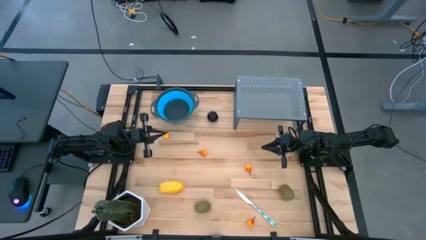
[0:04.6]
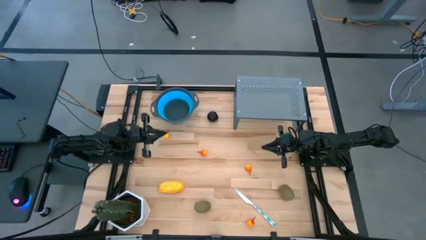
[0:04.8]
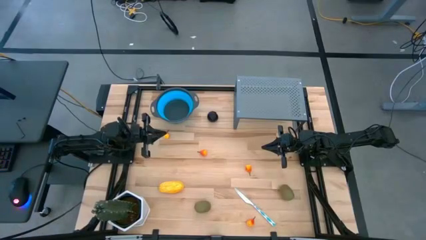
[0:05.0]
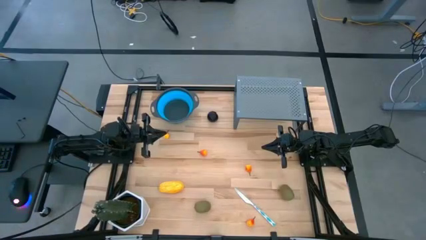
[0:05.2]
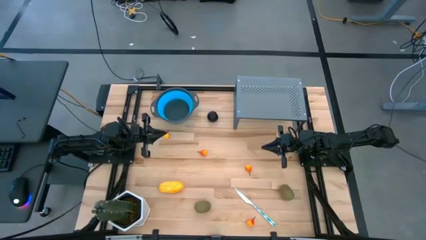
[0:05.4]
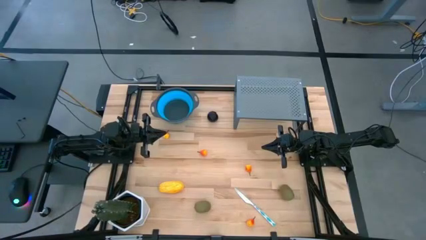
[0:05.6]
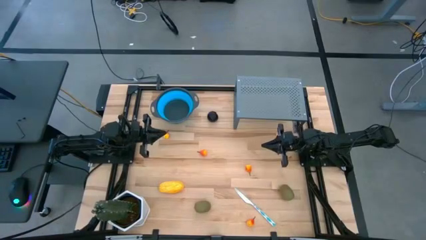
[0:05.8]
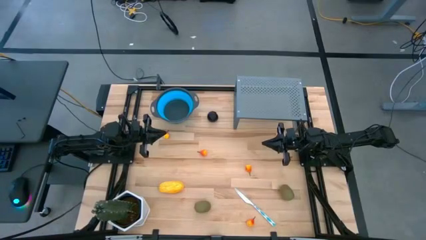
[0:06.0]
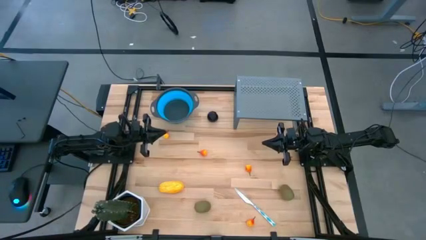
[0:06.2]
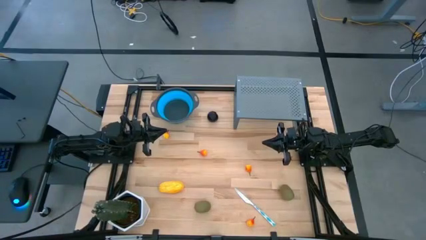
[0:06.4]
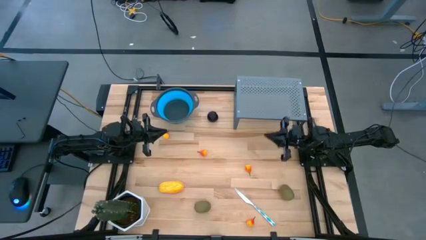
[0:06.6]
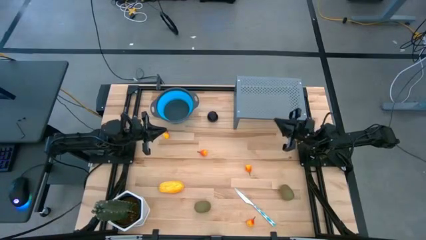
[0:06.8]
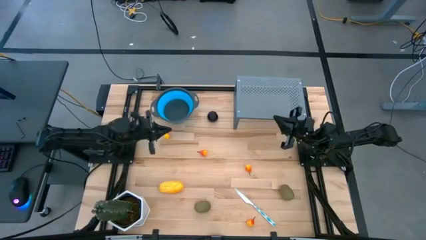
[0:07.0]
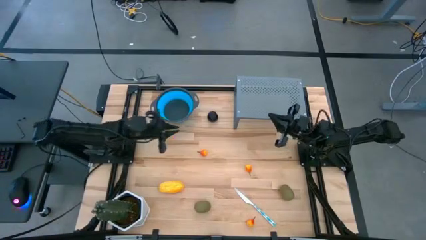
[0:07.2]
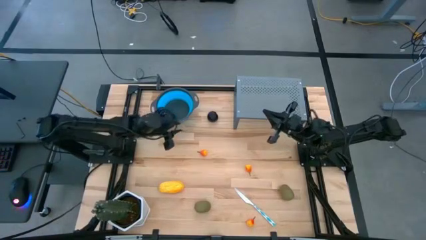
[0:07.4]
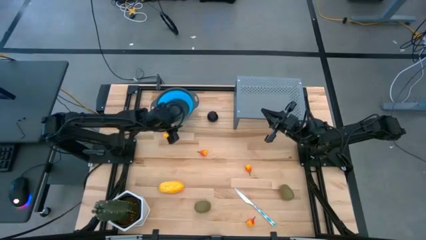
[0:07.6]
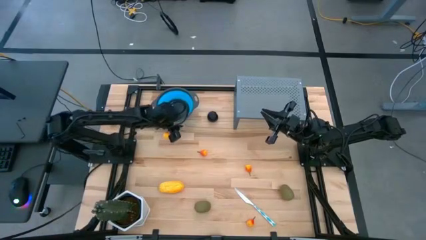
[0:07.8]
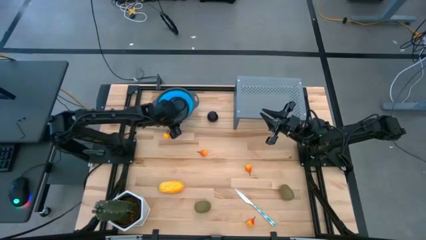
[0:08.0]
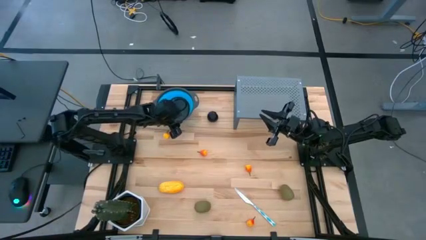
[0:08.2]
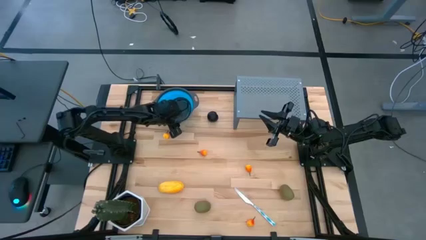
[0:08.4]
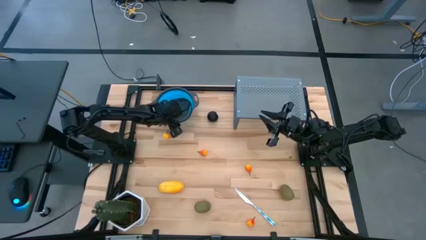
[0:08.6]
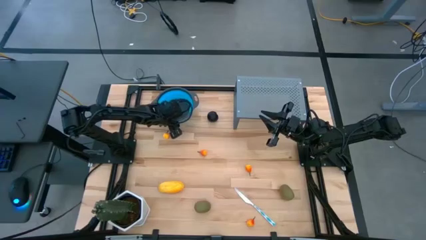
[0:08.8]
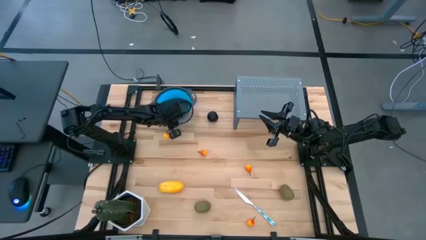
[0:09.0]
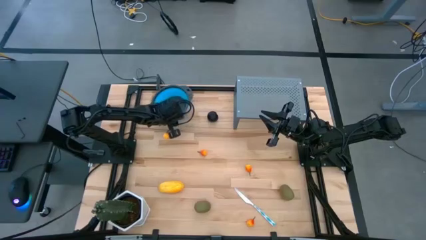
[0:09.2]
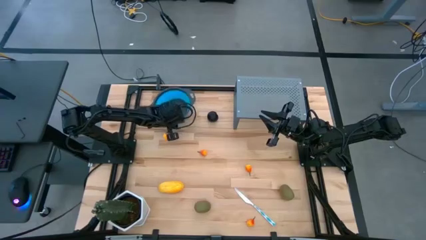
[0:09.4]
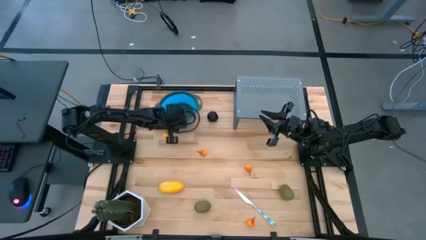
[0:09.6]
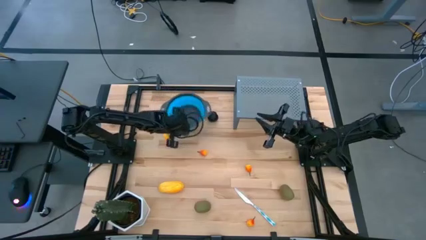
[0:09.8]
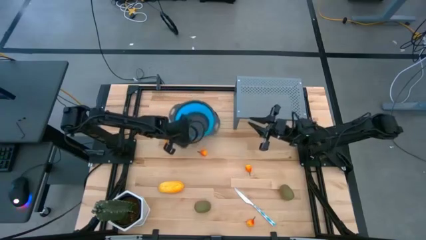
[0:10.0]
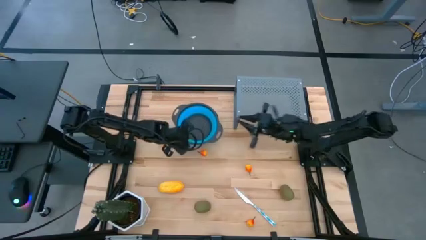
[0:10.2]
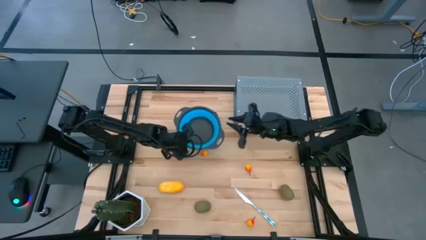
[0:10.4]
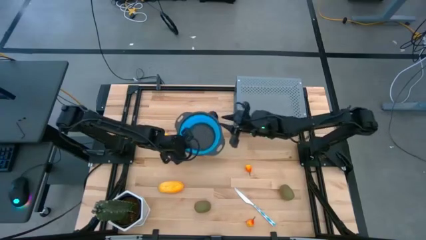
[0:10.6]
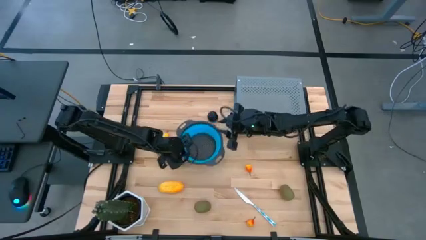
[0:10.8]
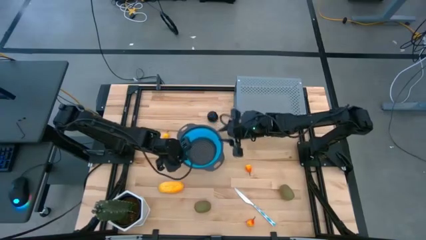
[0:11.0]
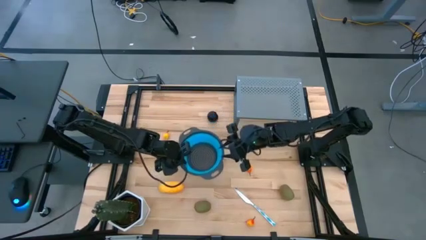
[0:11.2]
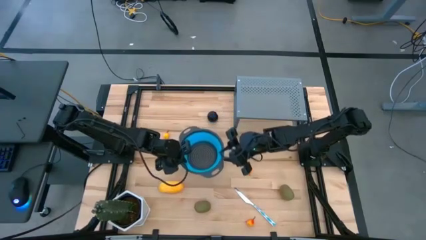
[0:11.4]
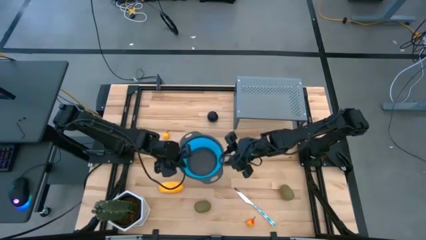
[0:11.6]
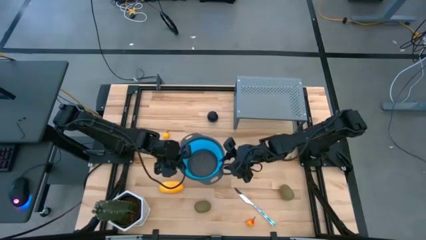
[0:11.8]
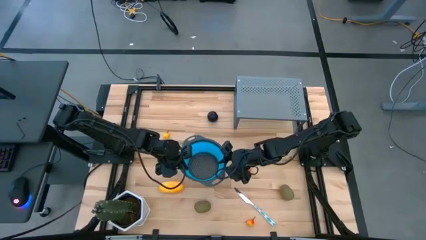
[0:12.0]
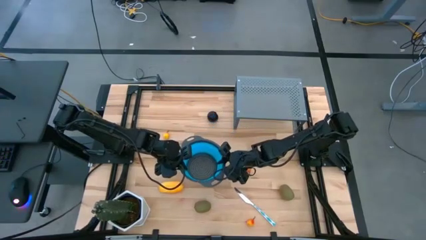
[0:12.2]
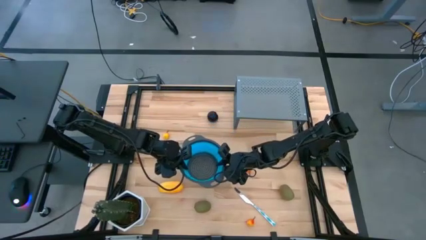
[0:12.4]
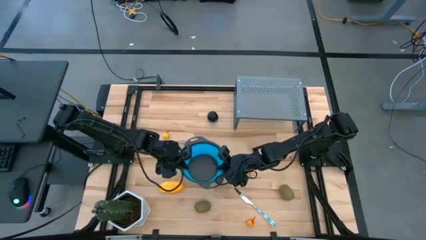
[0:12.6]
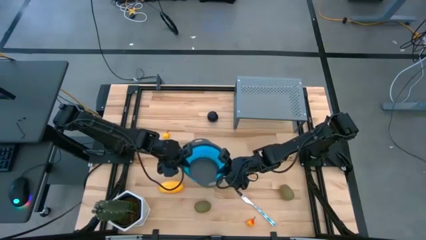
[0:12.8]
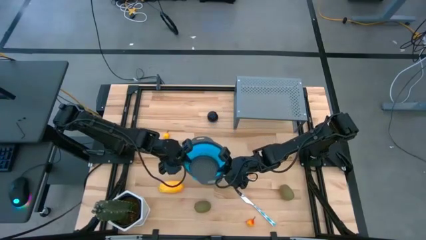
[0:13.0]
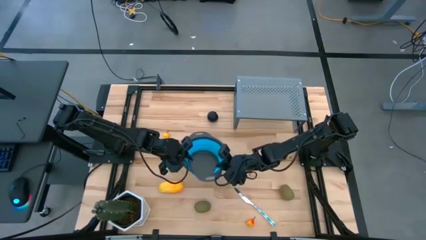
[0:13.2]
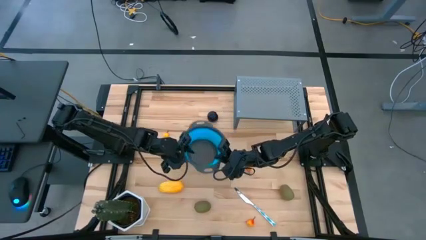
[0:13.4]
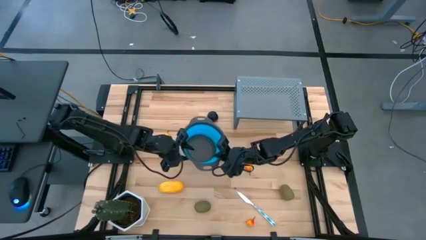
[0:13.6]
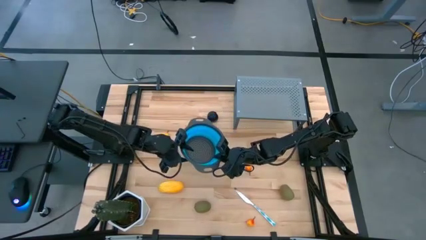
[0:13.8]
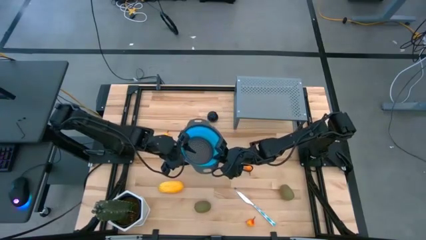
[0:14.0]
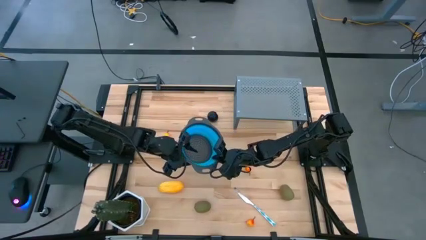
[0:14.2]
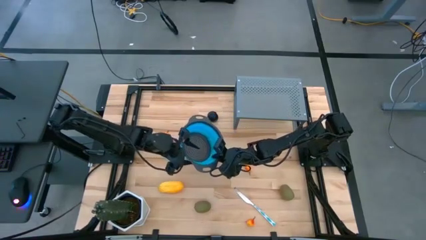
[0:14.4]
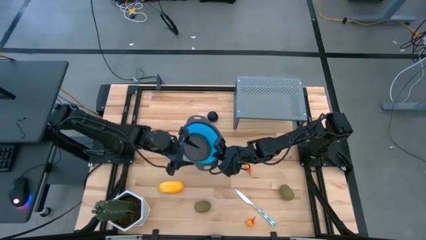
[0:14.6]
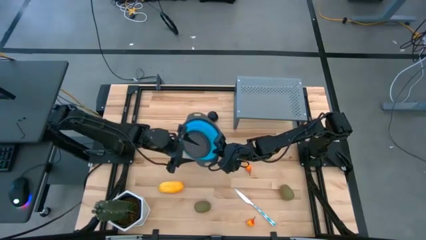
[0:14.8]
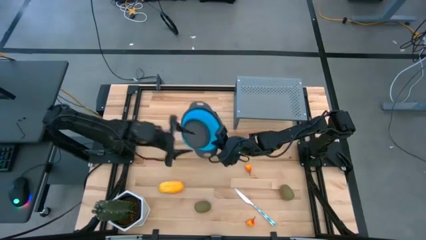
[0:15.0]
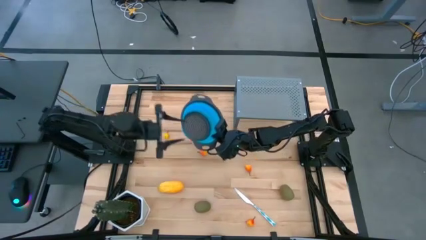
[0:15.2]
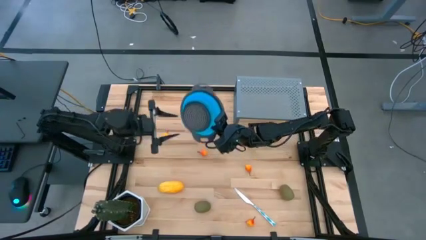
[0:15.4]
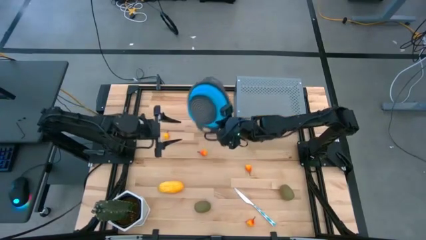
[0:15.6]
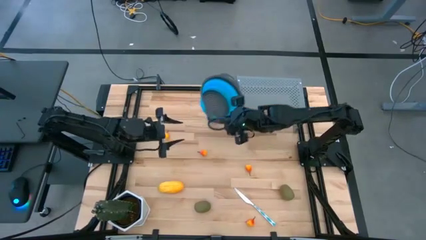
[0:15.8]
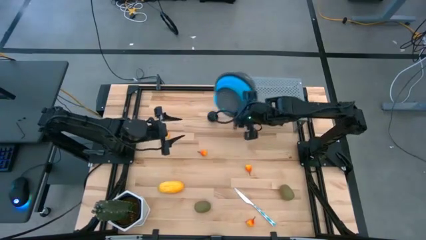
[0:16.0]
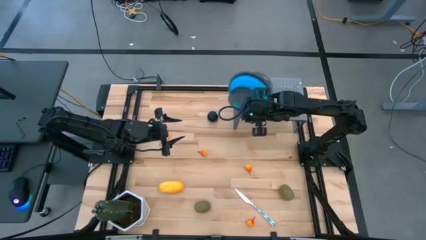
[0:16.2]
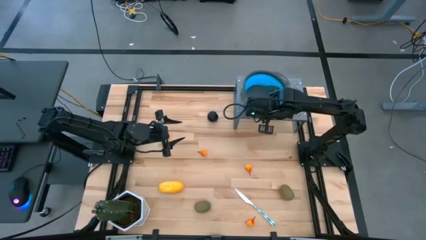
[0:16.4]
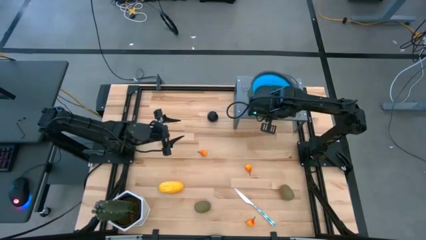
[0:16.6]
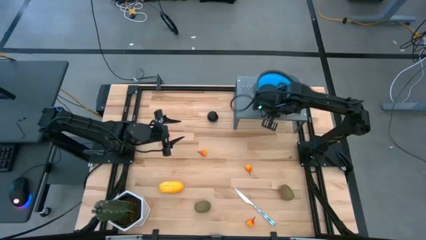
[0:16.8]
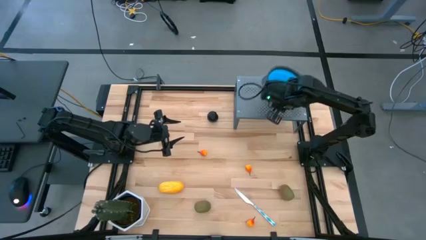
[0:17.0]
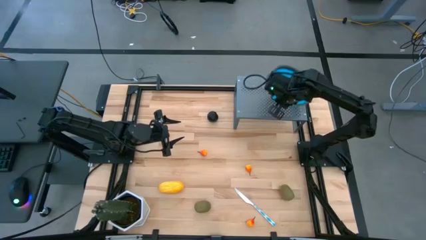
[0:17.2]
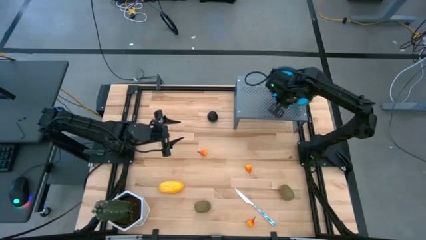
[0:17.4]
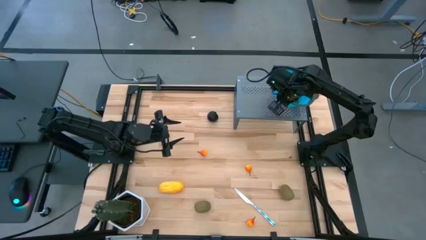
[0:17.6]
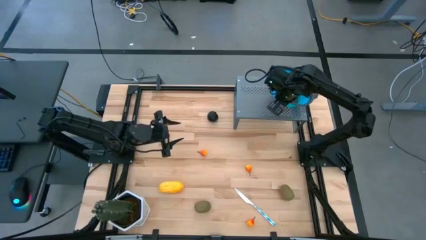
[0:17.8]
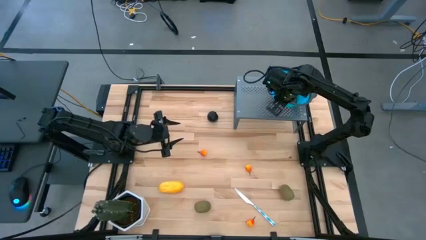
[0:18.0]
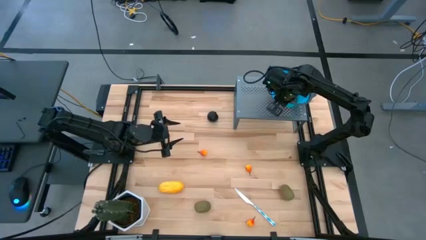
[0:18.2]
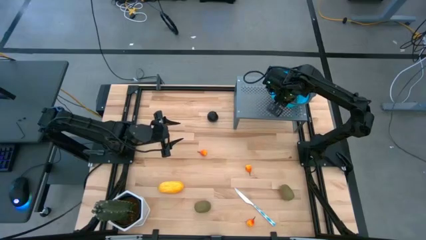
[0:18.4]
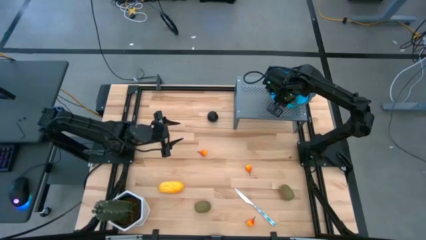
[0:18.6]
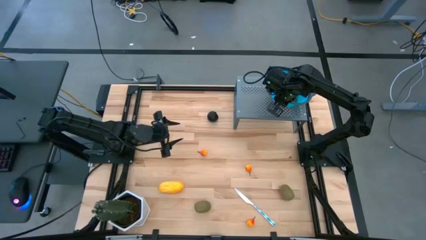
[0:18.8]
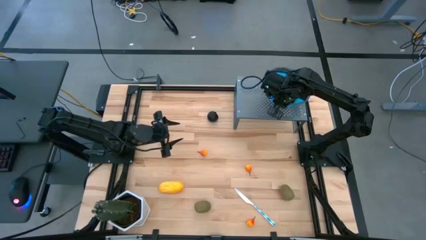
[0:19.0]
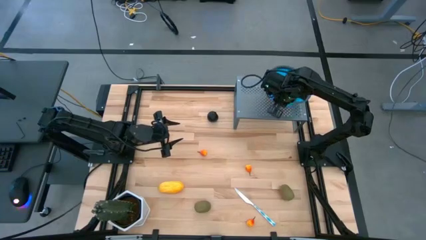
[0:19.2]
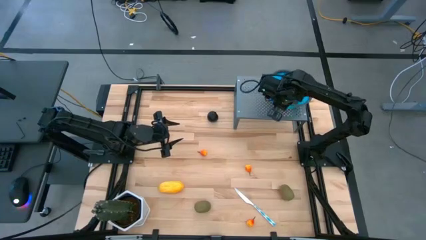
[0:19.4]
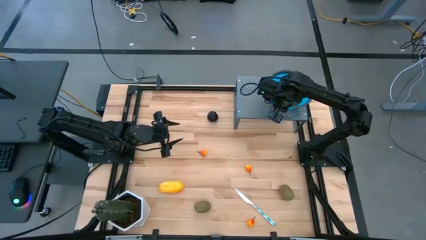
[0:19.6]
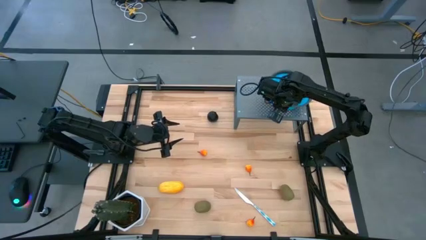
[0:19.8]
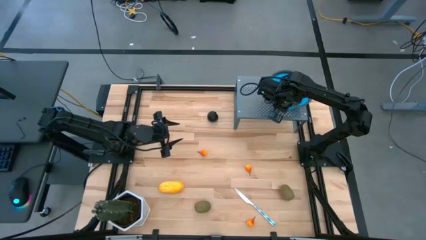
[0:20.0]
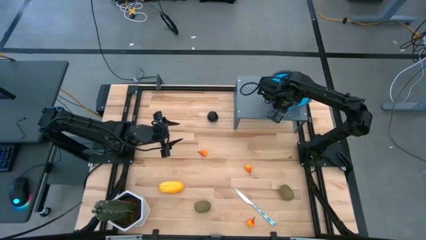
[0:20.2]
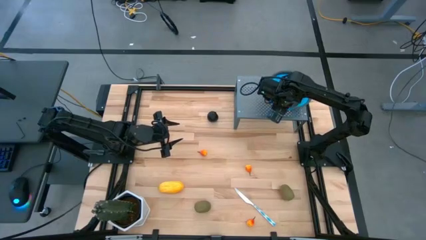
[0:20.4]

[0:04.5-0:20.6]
Task: Pick & Place Fruit
Put the blue strainer bowl on the shelf
